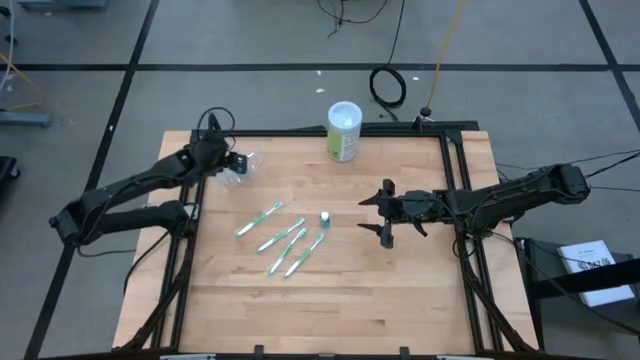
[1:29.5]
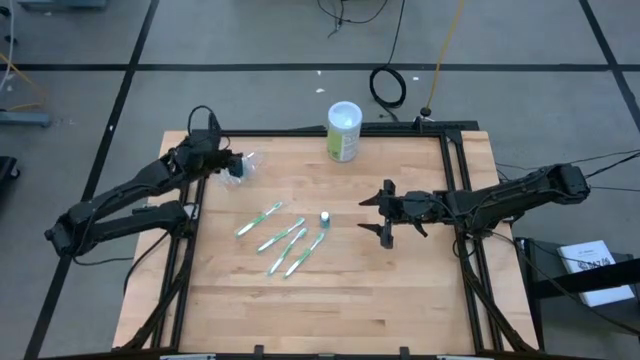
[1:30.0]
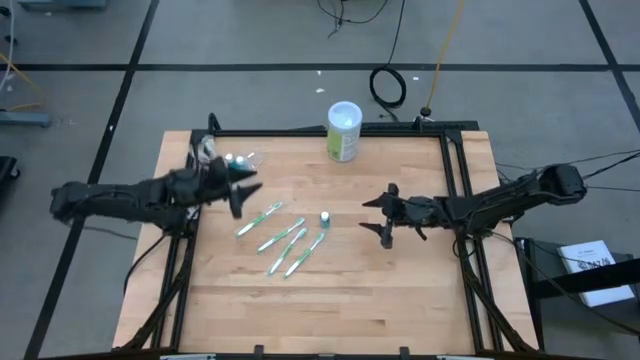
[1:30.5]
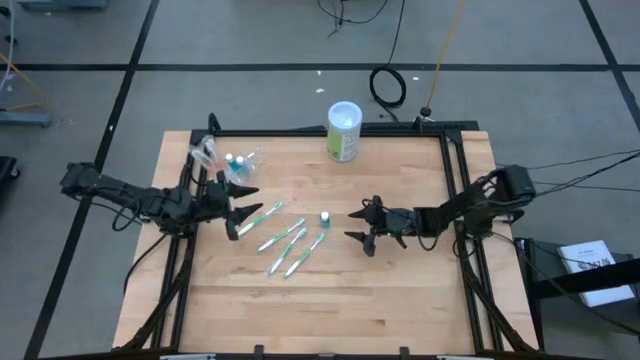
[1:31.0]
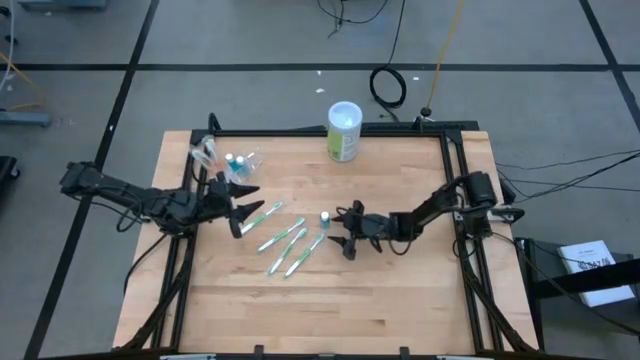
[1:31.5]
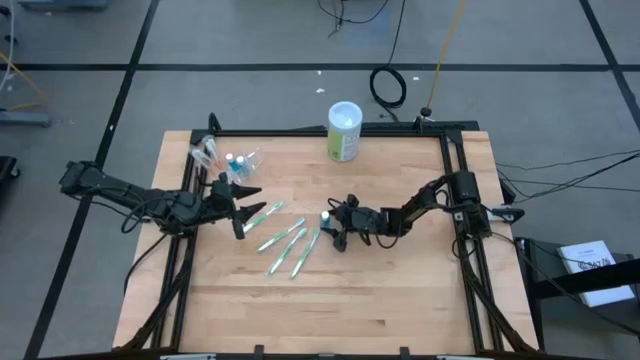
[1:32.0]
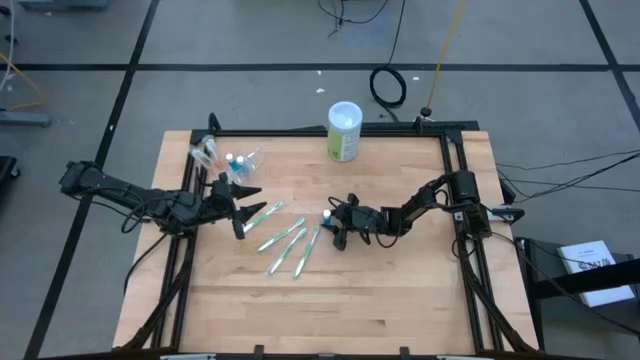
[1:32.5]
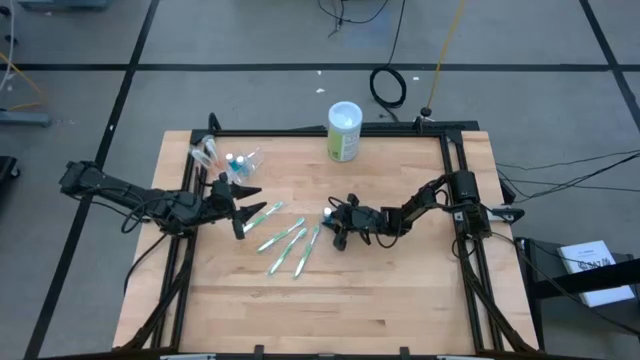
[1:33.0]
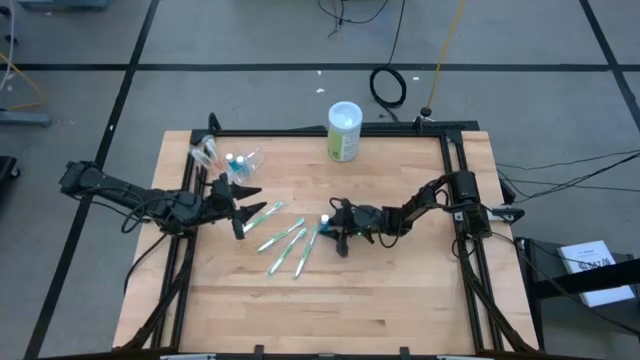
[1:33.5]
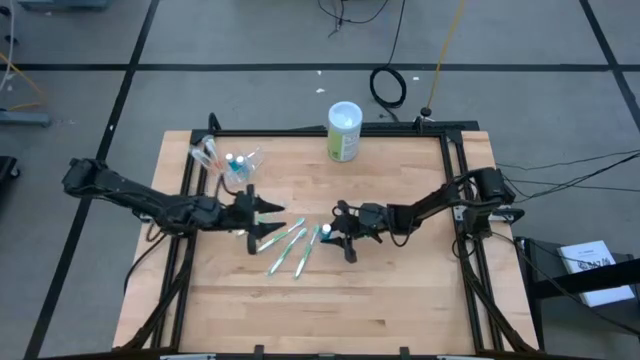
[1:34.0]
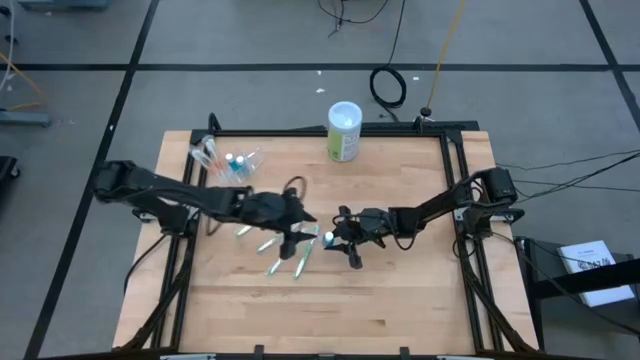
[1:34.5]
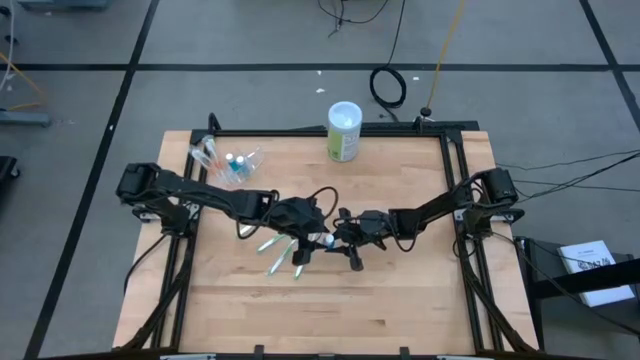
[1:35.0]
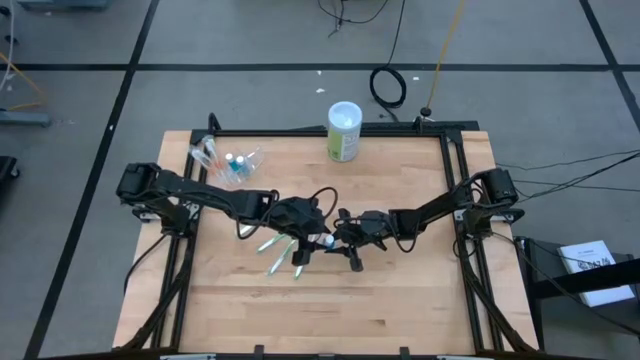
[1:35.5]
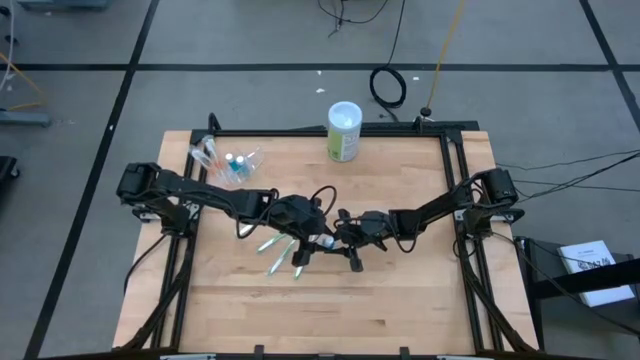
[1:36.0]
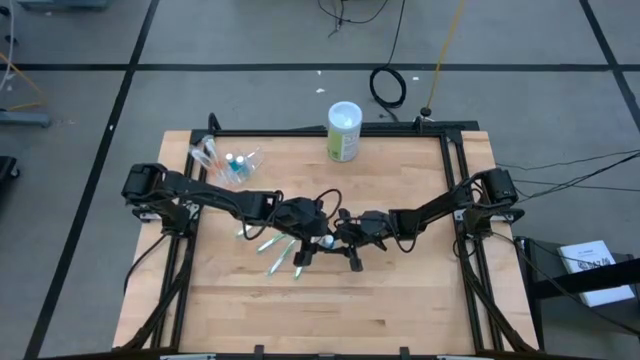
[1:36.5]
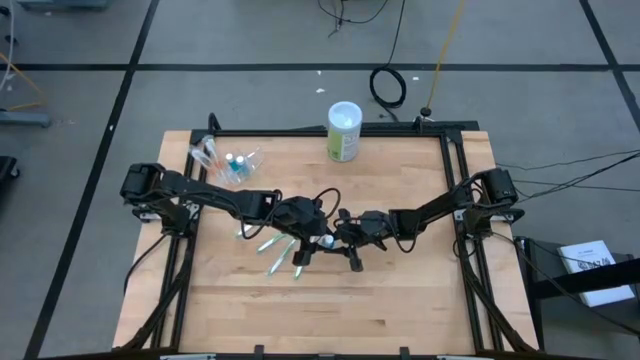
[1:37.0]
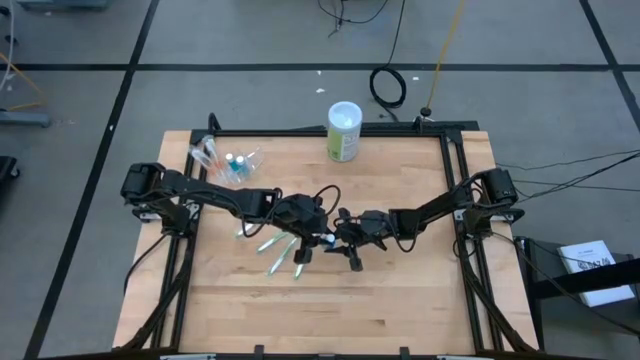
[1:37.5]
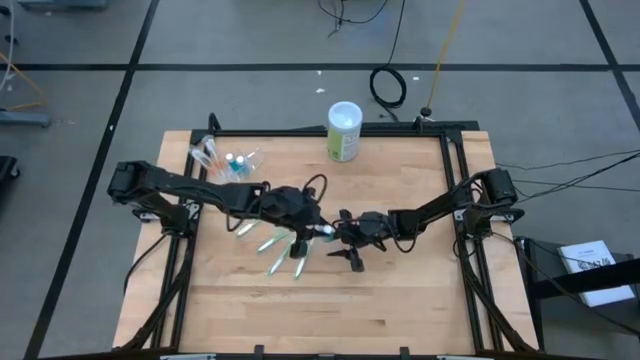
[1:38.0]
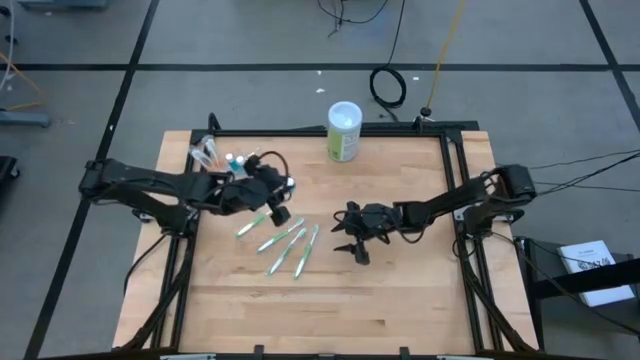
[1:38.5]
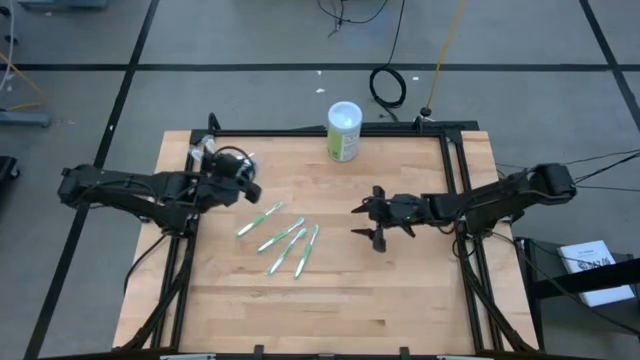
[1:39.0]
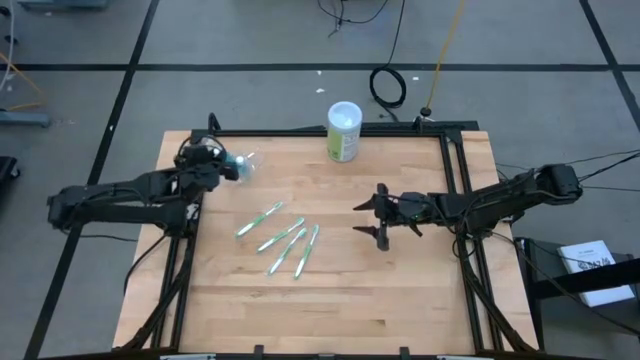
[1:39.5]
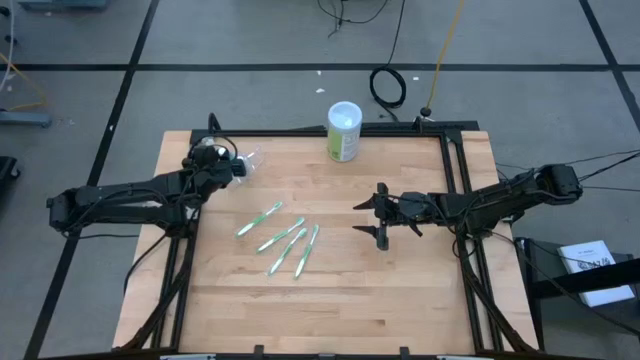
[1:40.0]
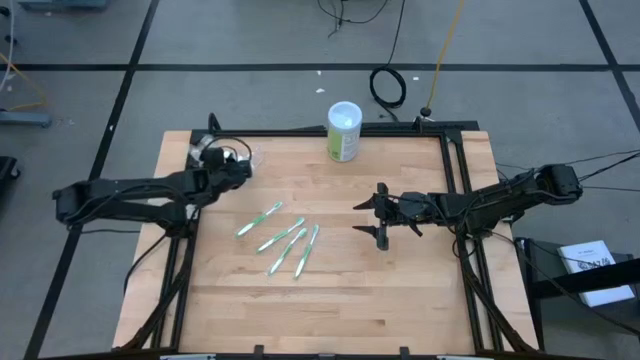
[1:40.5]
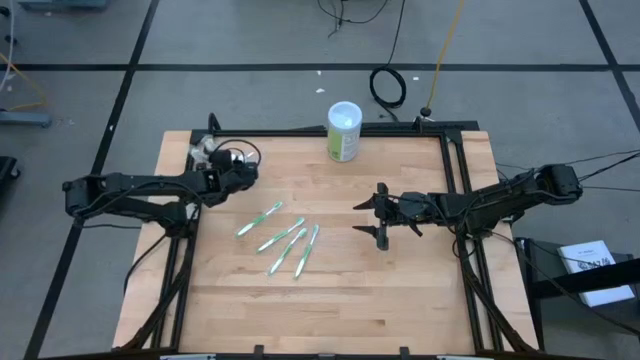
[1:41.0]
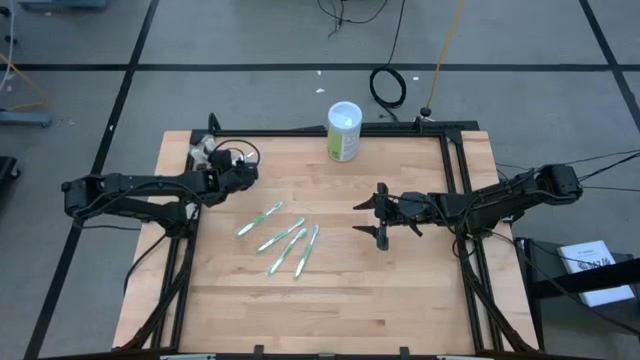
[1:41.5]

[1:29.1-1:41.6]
Task: Pick & Place toothbrushing station
Put the blue mouthwash into the middle section of the transparent organizer

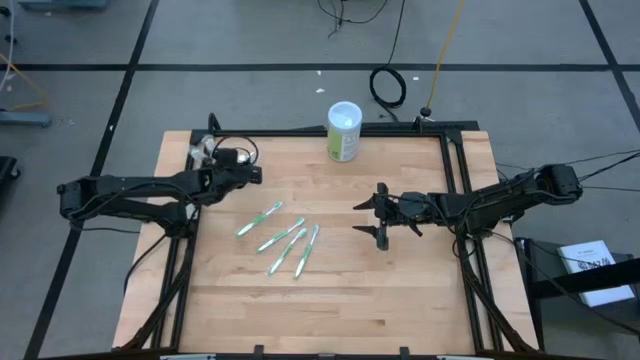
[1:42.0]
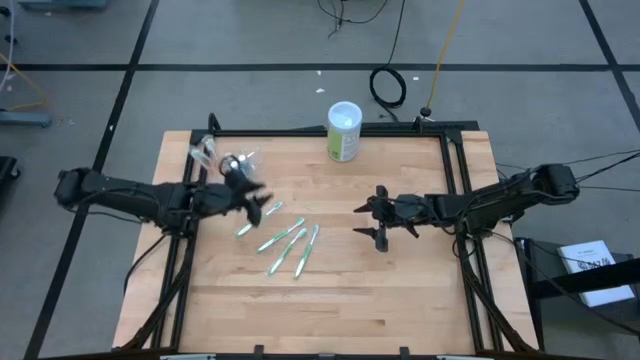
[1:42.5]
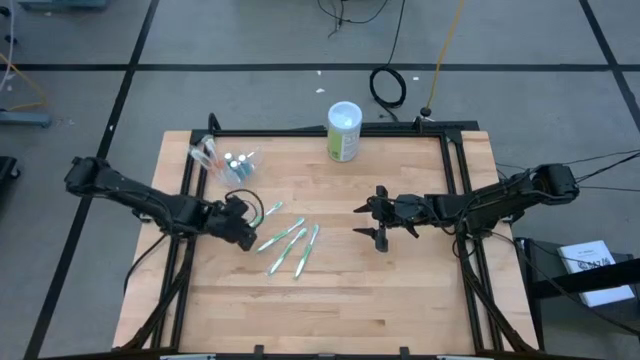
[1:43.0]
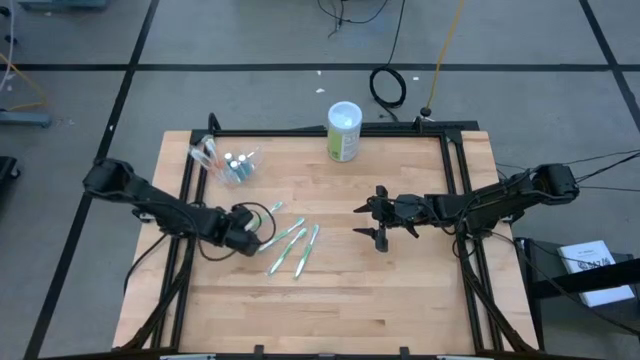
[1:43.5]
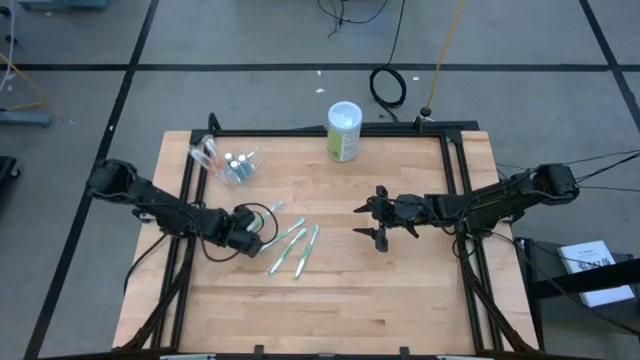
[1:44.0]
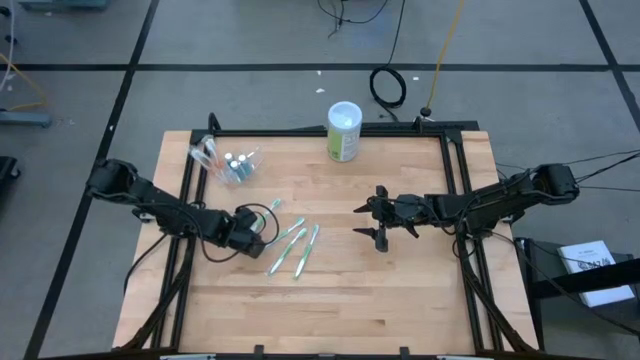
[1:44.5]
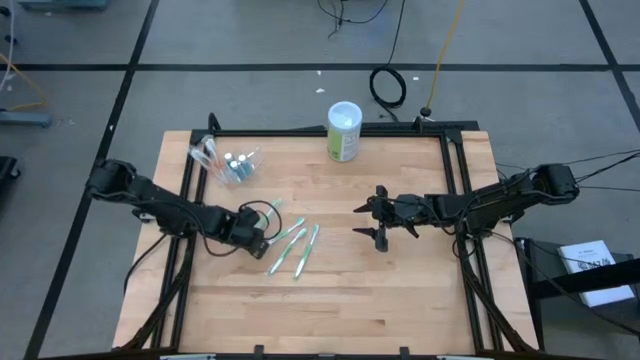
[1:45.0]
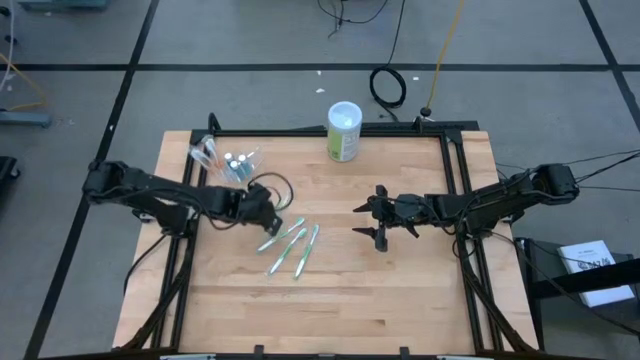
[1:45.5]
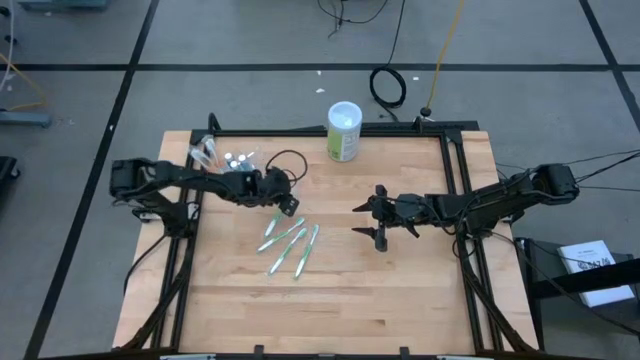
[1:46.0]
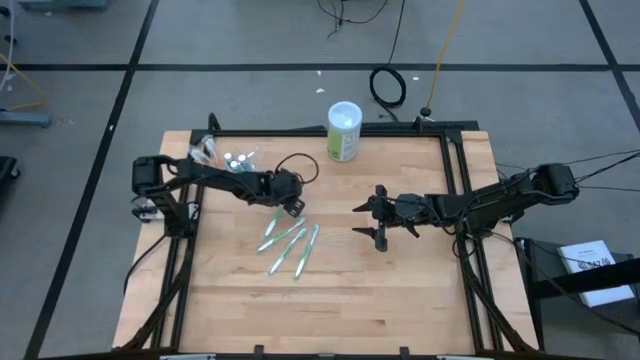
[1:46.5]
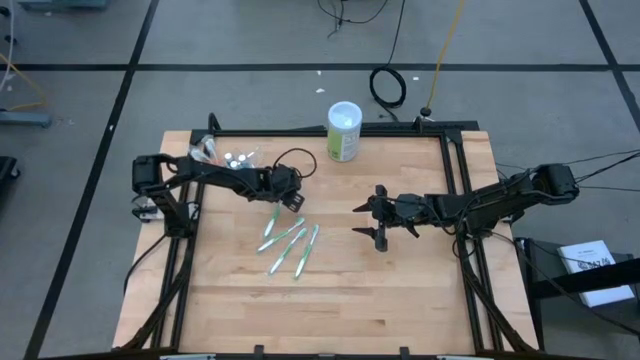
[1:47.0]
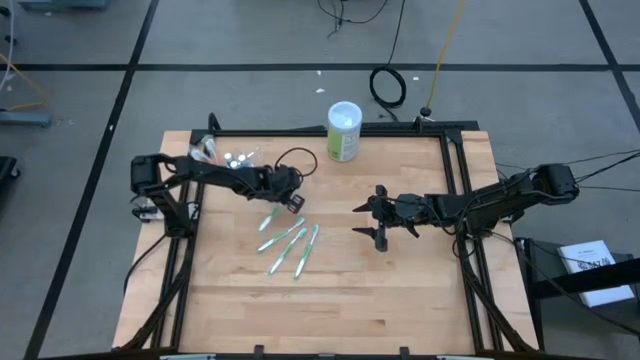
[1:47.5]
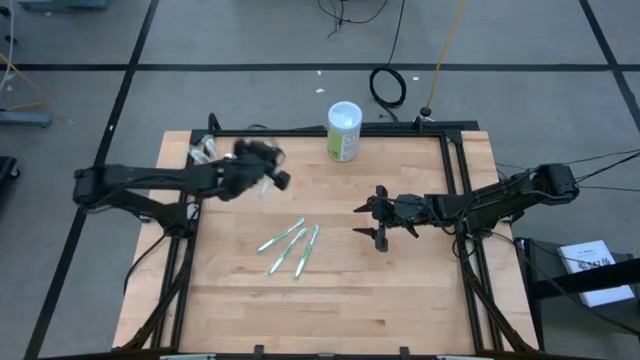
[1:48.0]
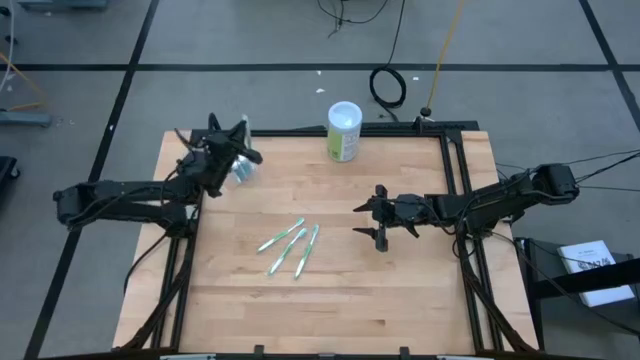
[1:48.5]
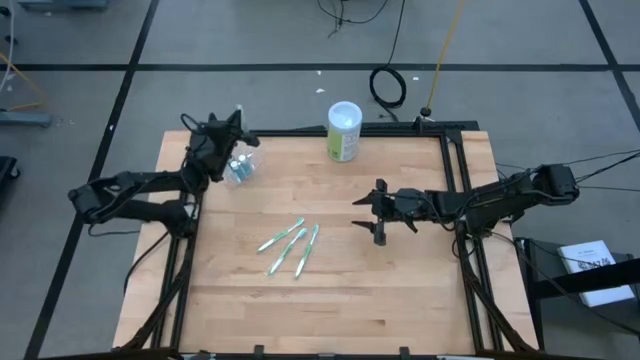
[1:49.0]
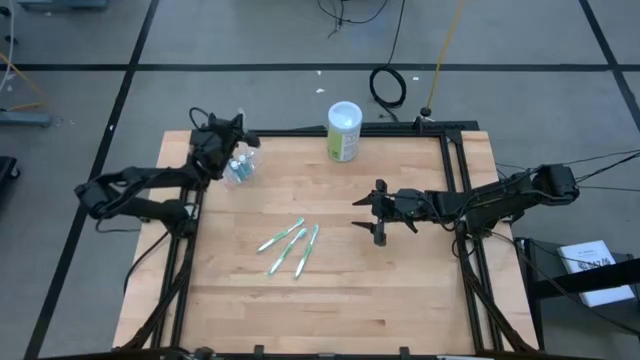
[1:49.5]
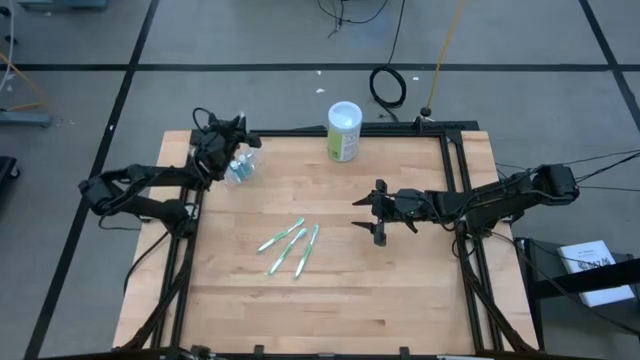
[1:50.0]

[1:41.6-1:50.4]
Put the green toothbrush into the right section of the transparent organizer

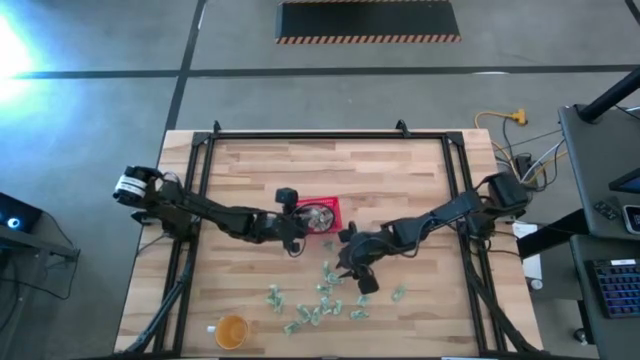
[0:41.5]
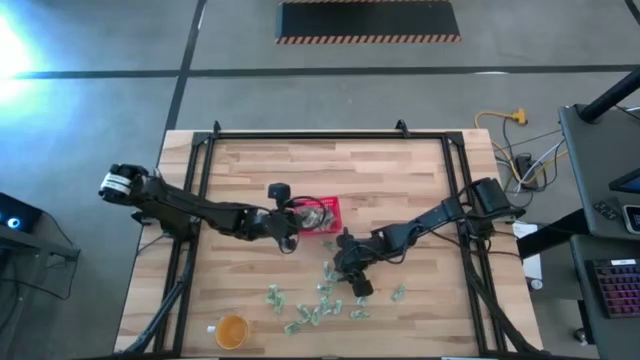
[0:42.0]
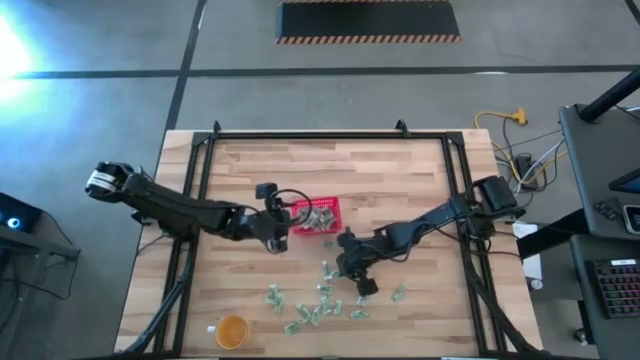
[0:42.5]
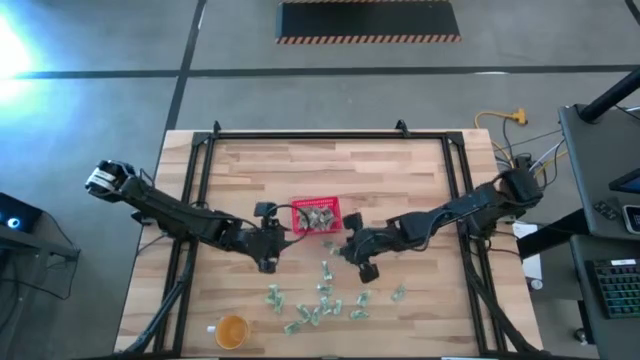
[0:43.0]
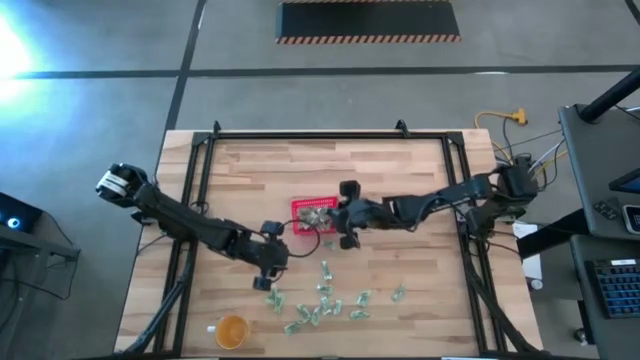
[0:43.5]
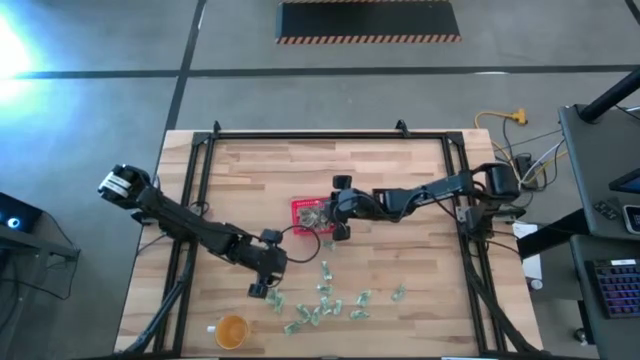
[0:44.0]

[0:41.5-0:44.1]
Task: Pick and place items into bin
Put the stevia packet into the red bin
